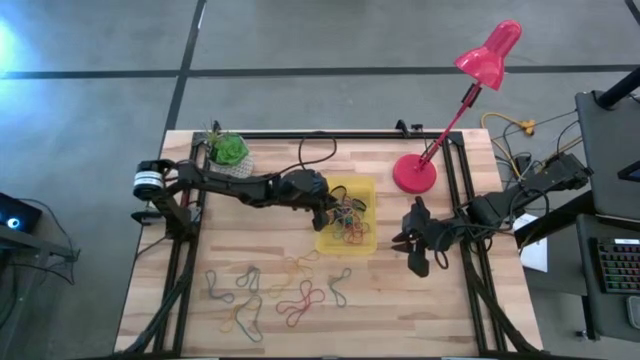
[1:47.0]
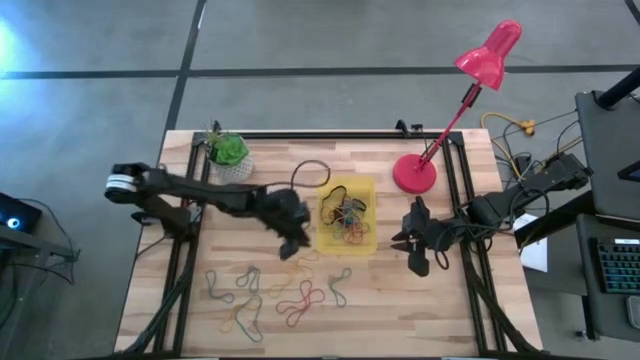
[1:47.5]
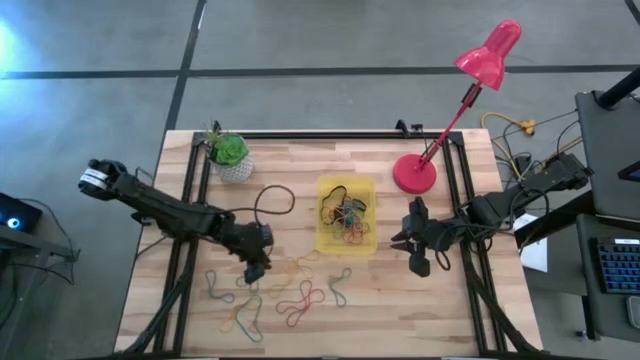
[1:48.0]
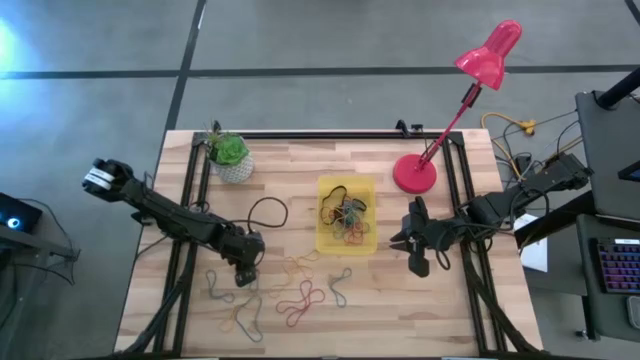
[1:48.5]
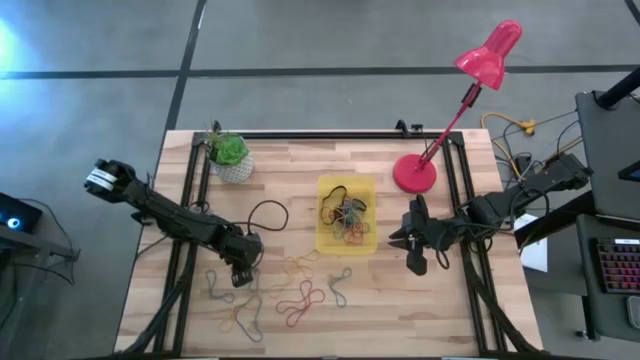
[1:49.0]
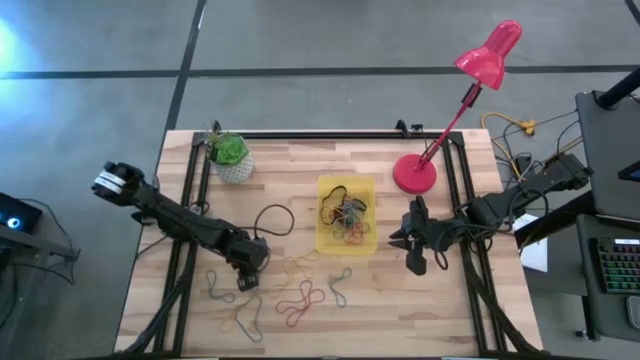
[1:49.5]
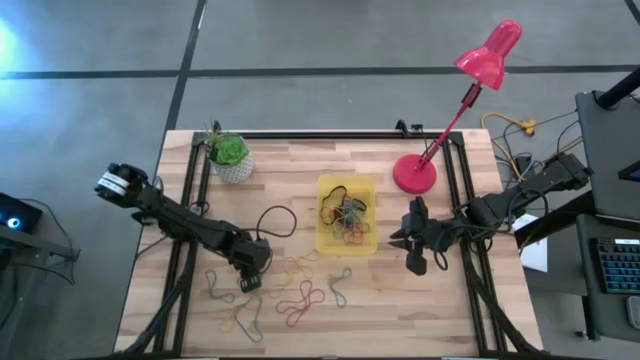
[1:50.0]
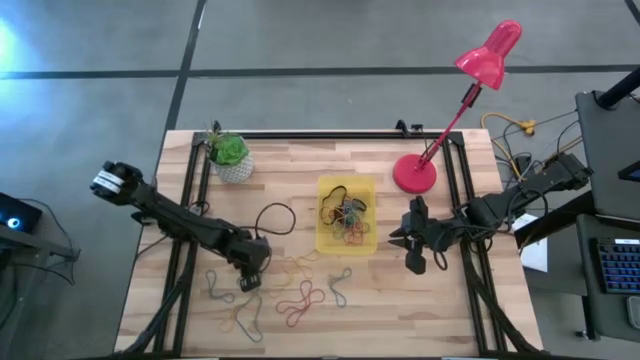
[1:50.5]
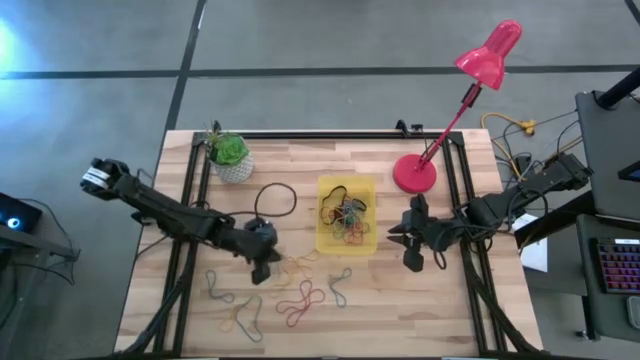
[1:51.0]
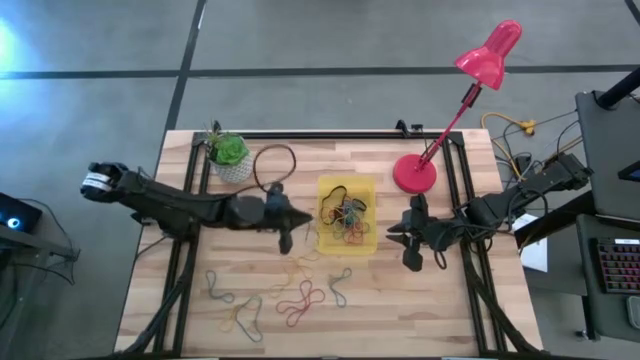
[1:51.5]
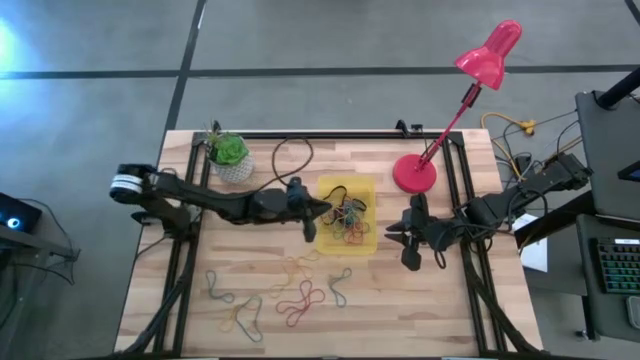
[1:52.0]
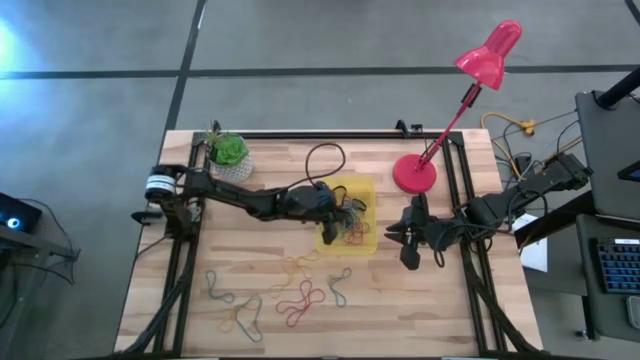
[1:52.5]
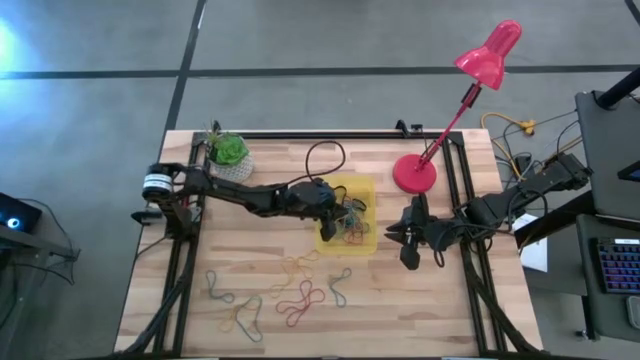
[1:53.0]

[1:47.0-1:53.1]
Task: Pick and place rubber bands into bin
Put the blue rubber band into the bin

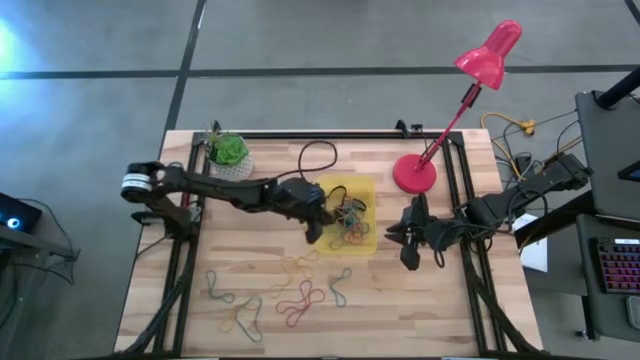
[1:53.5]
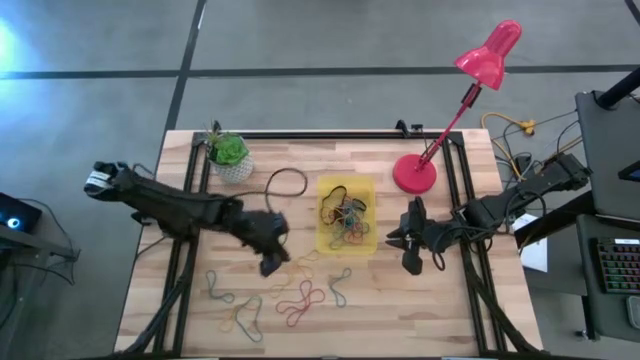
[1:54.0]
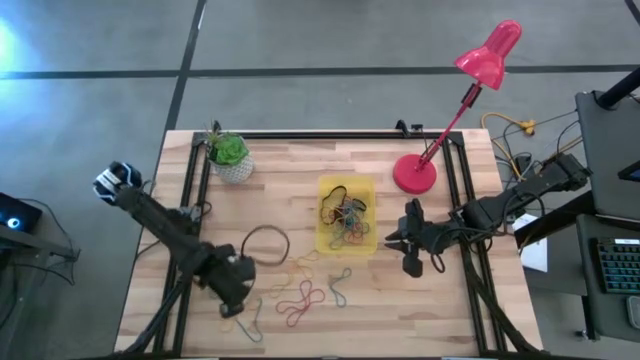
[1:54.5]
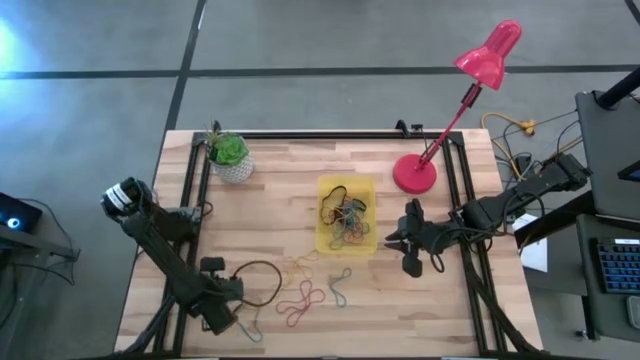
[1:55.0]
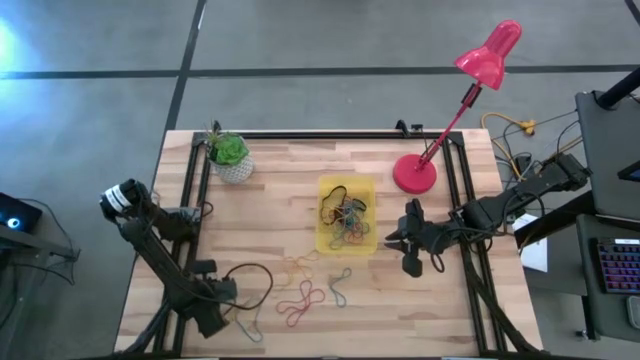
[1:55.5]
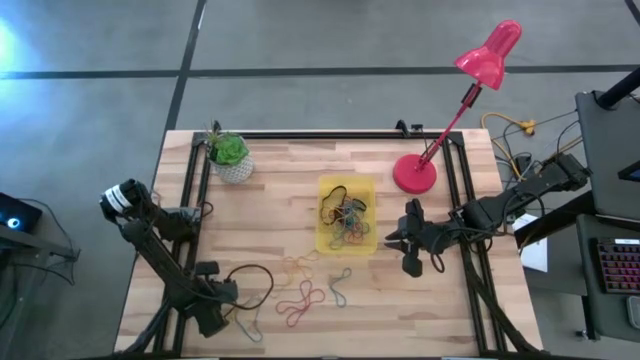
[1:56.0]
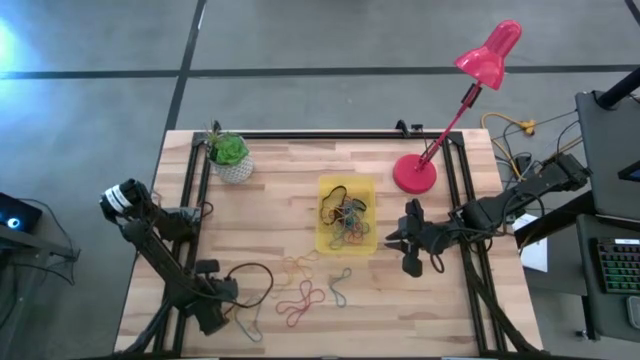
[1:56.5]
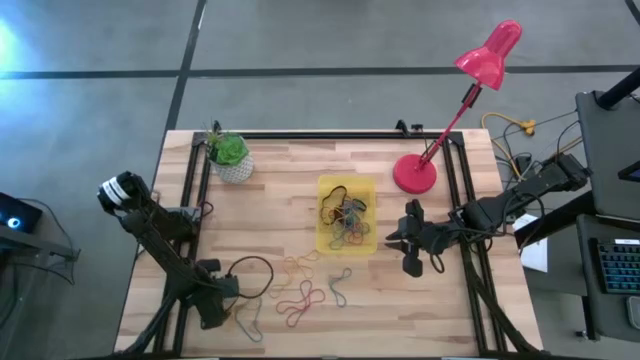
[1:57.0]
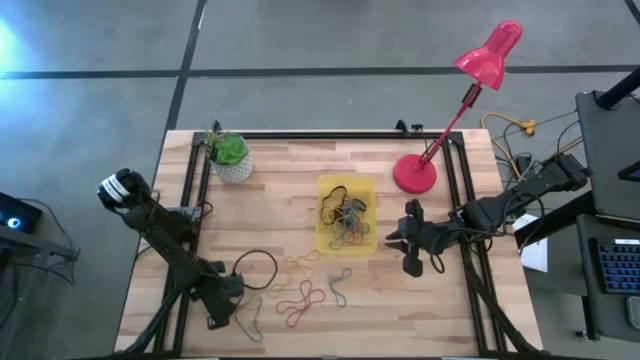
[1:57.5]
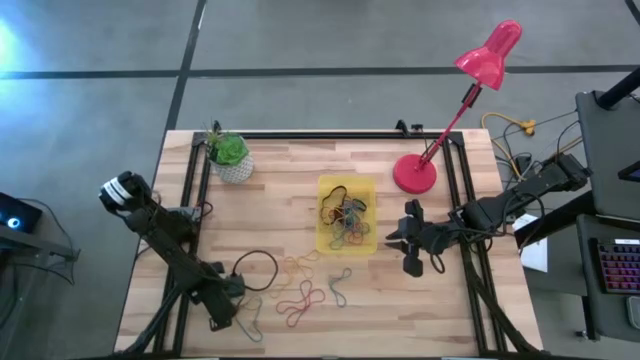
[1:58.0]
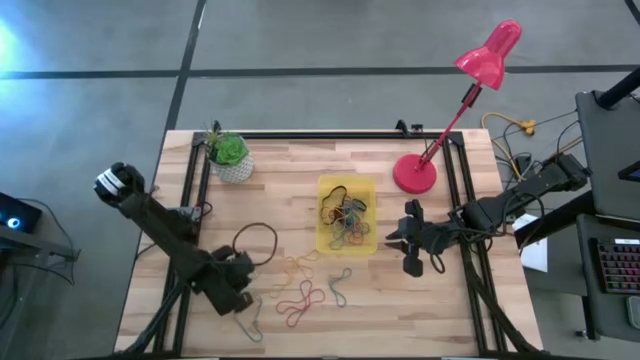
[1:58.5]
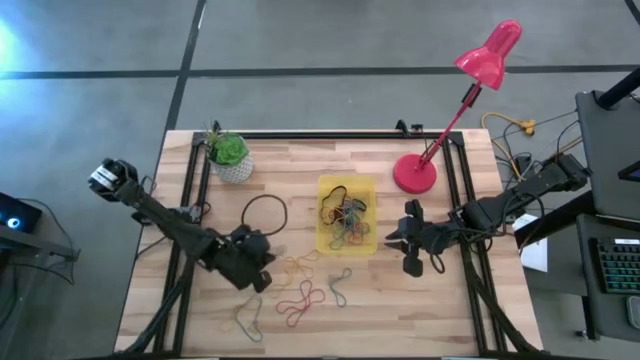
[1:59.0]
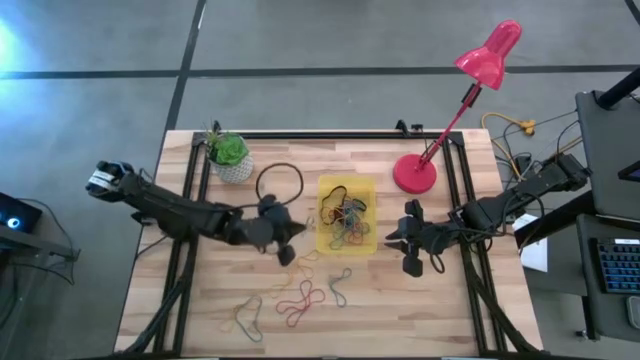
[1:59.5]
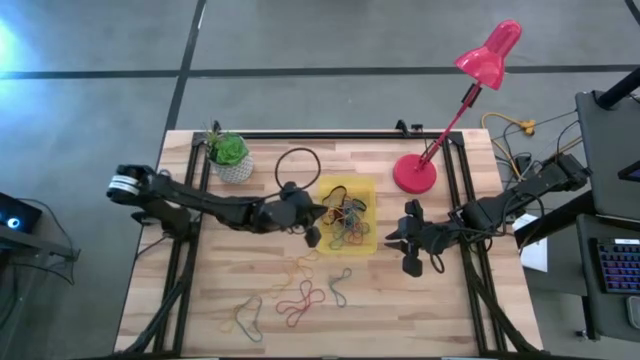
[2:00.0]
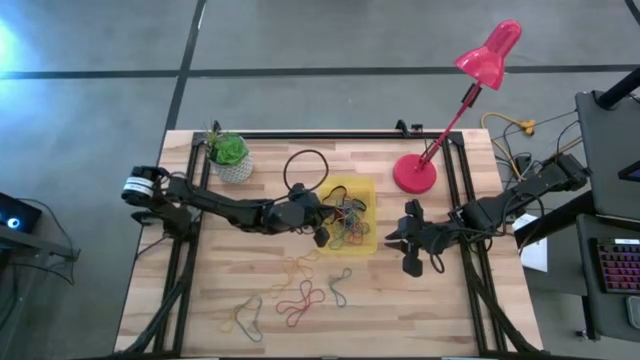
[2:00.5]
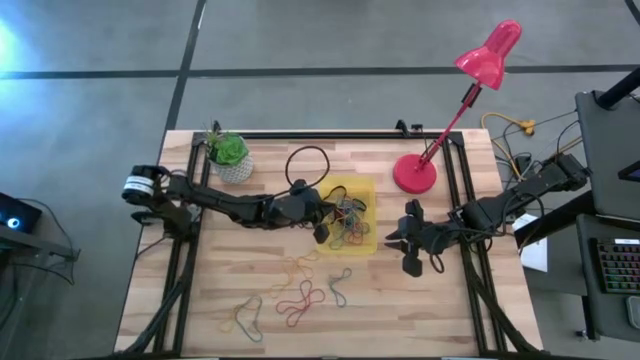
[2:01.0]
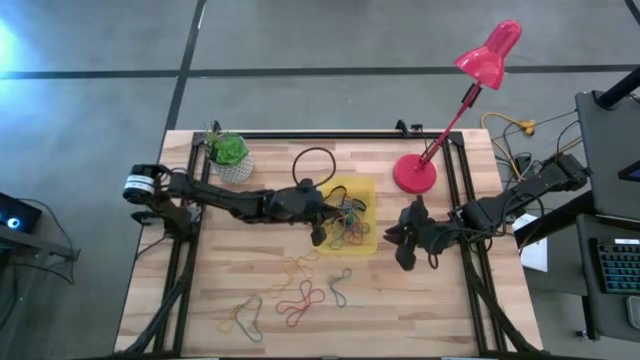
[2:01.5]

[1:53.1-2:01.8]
Put the left blue rubber band into the bin

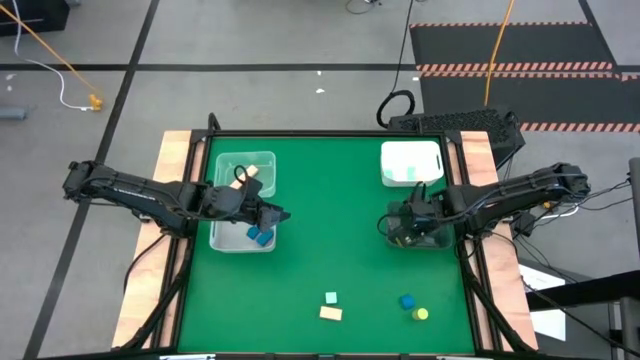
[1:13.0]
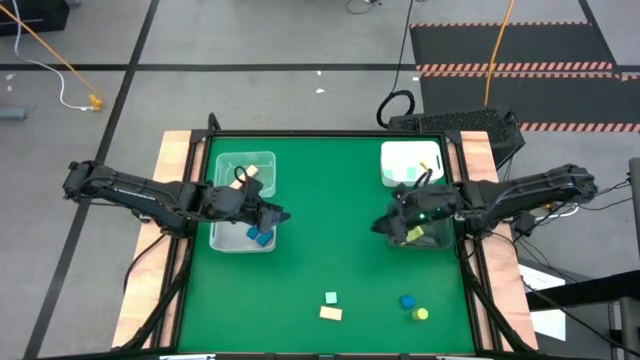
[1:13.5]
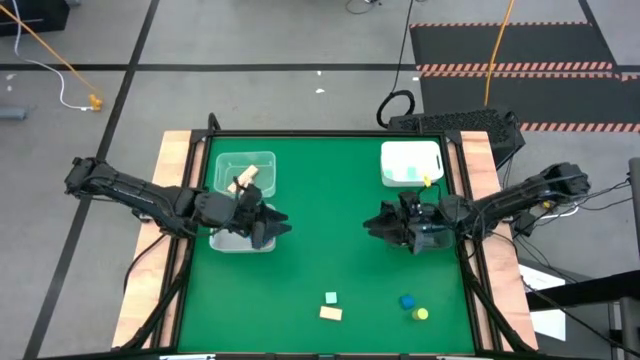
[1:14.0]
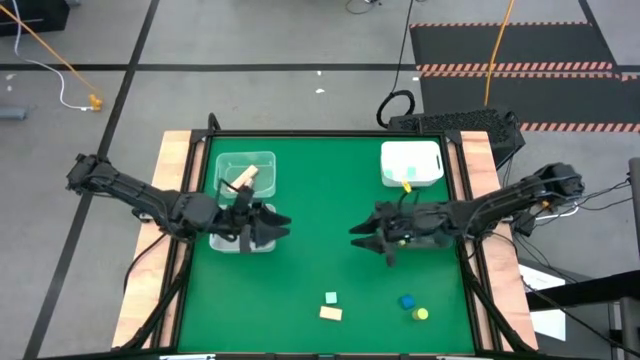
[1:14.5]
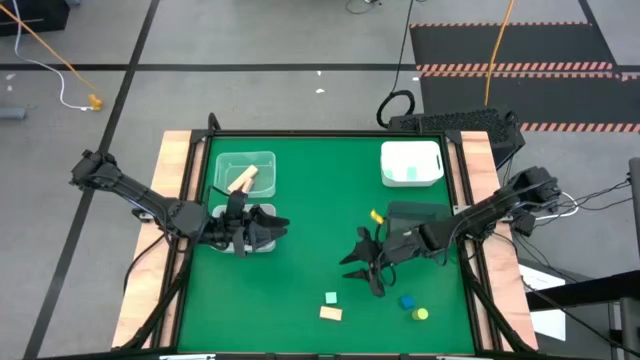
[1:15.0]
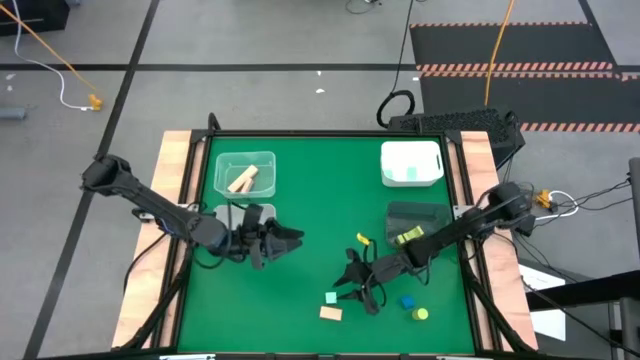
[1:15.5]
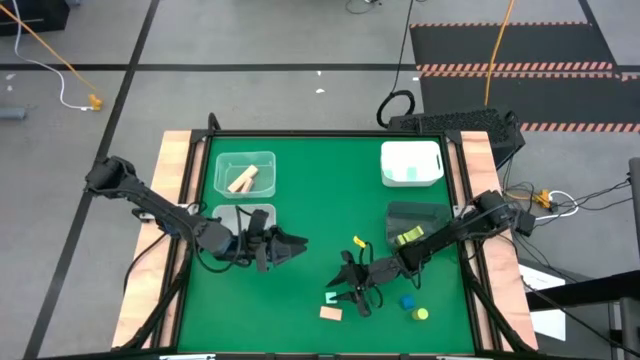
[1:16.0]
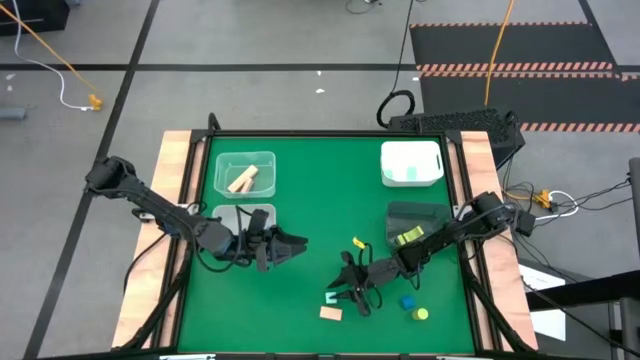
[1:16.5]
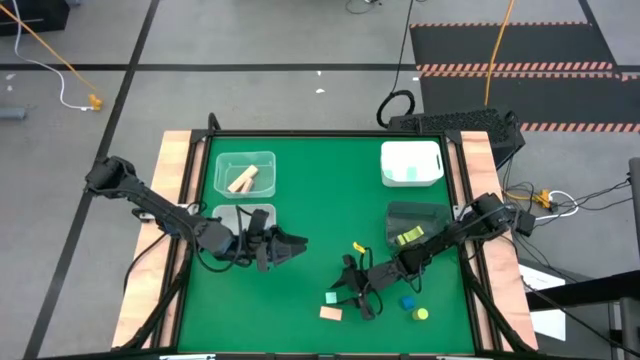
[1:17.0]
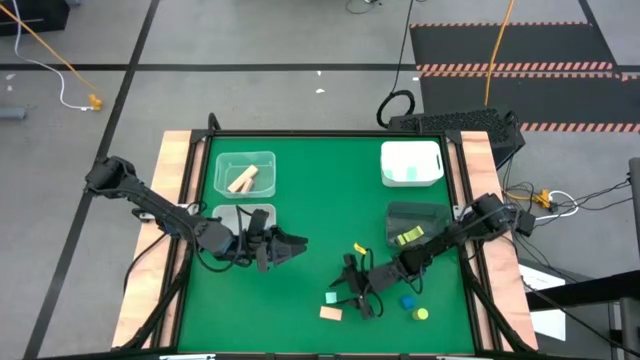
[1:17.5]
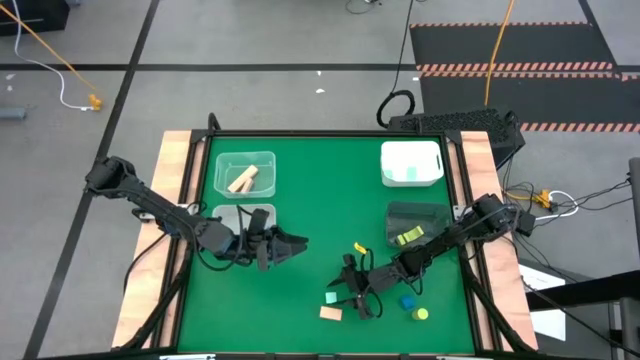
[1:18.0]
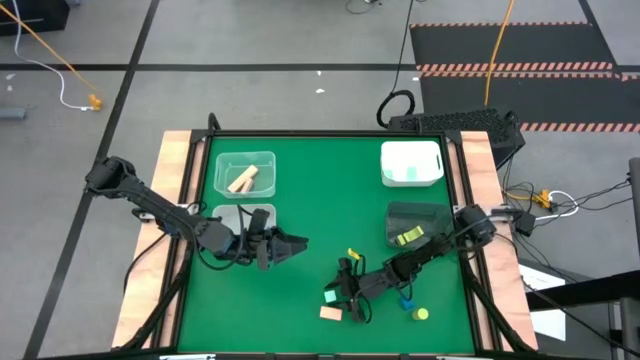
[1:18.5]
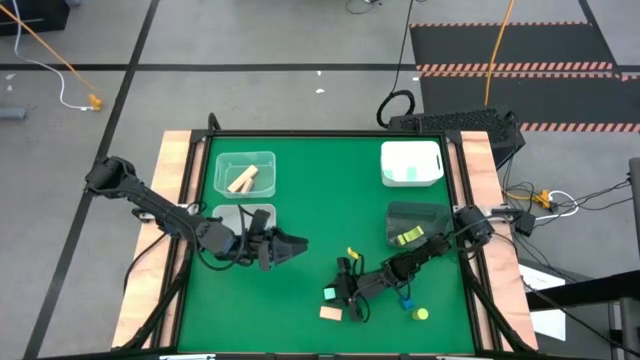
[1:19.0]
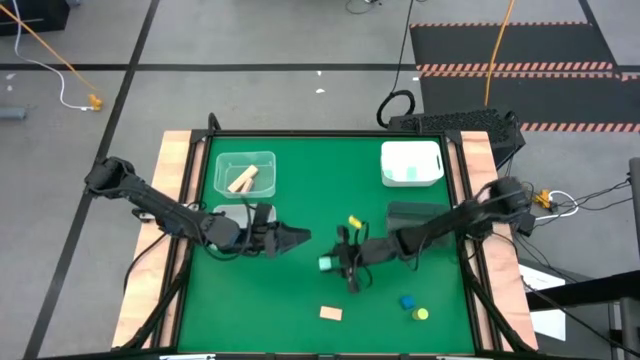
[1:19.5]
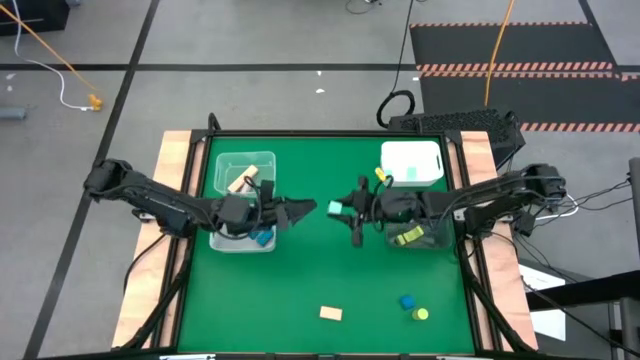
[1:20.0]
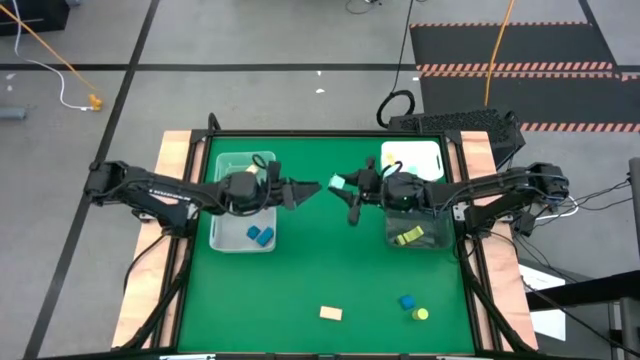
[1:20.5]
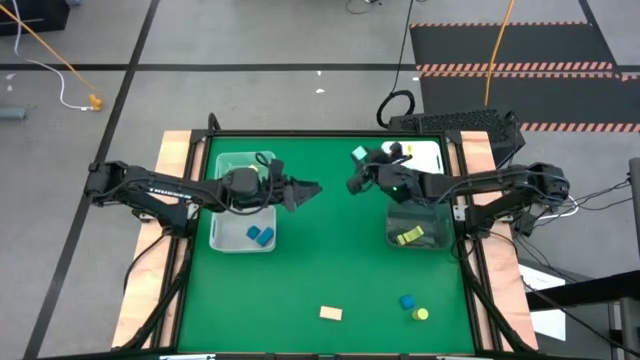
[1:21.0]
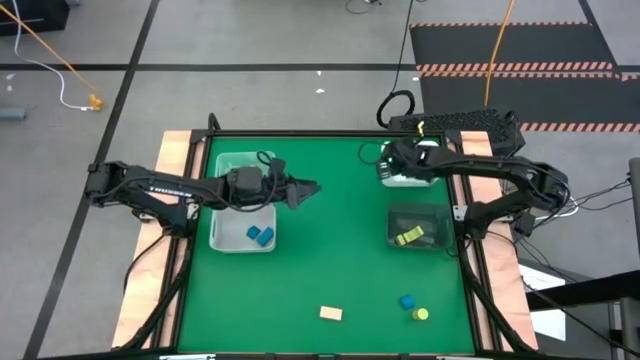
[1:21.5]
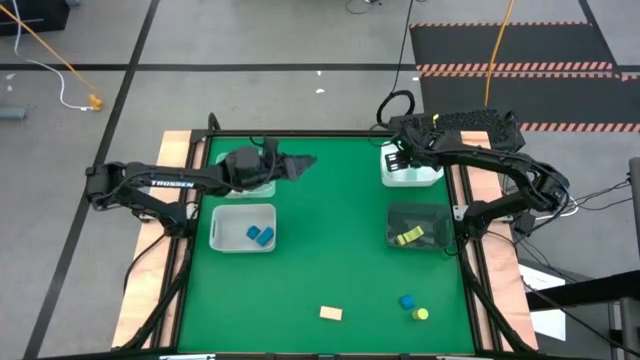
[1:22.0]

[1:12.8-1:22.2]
Task: Sort & place blocks by color
Put the light blue block into the white bin
